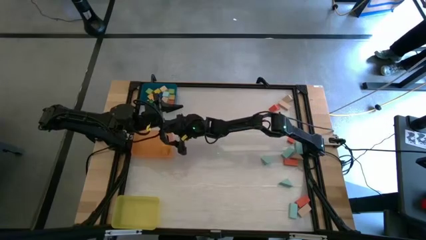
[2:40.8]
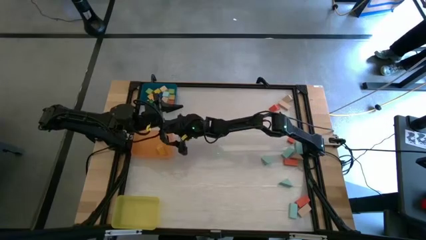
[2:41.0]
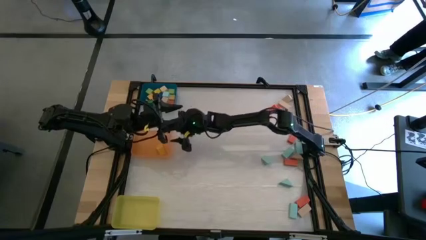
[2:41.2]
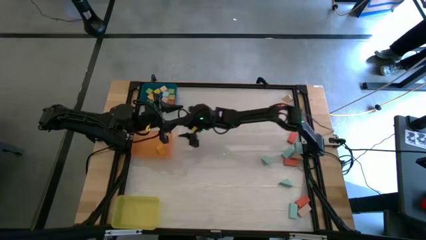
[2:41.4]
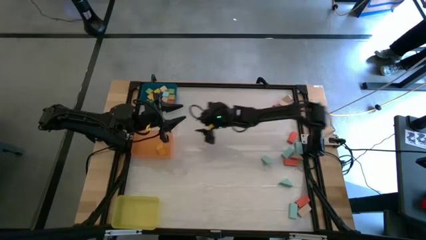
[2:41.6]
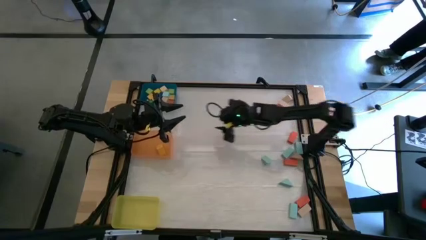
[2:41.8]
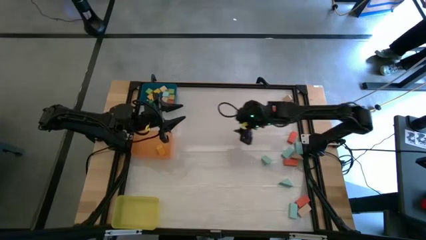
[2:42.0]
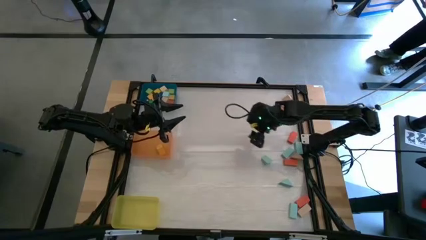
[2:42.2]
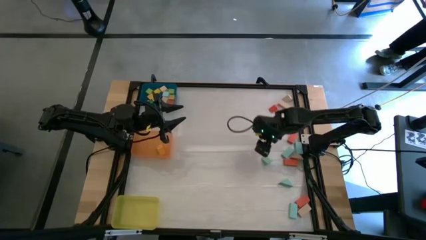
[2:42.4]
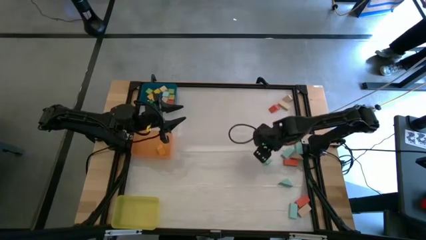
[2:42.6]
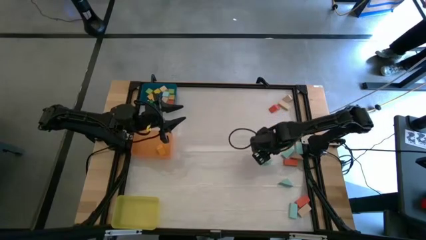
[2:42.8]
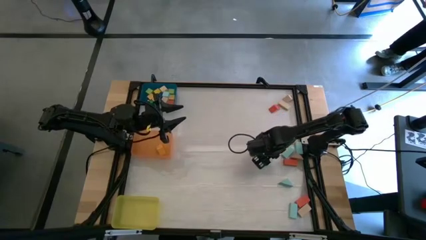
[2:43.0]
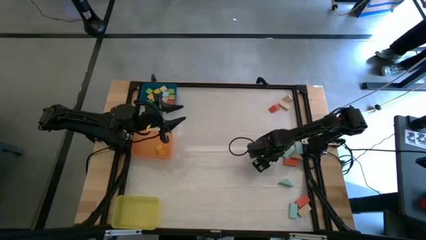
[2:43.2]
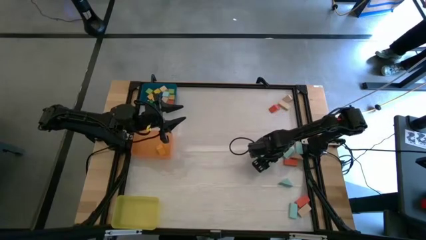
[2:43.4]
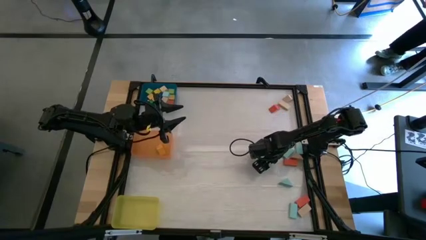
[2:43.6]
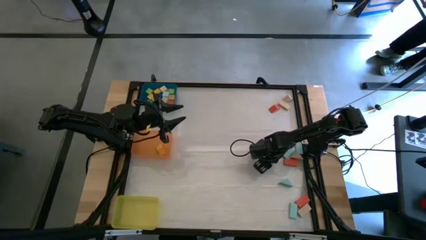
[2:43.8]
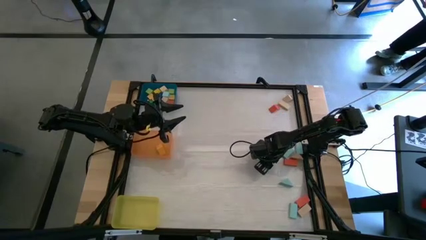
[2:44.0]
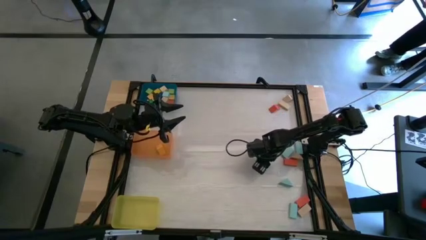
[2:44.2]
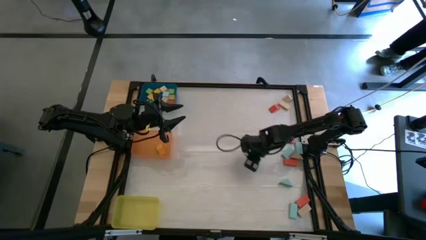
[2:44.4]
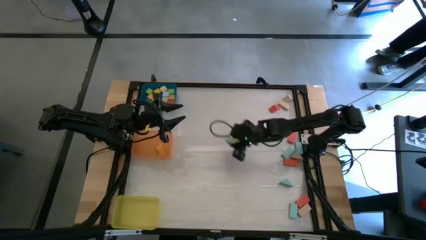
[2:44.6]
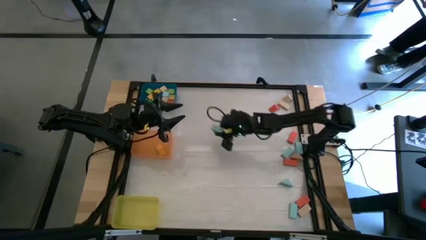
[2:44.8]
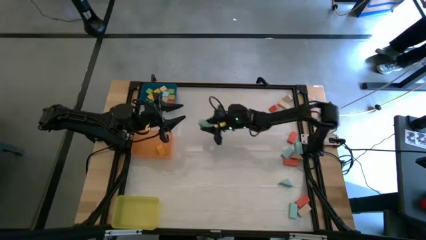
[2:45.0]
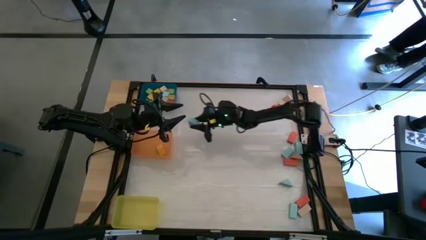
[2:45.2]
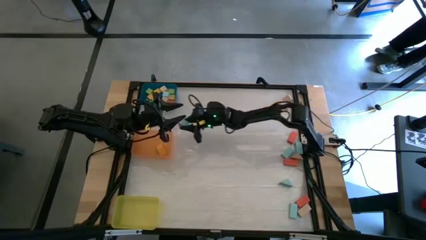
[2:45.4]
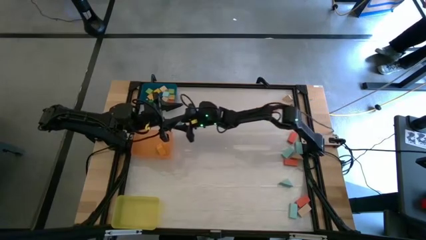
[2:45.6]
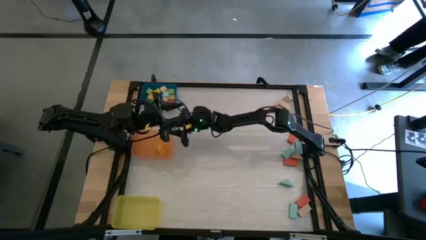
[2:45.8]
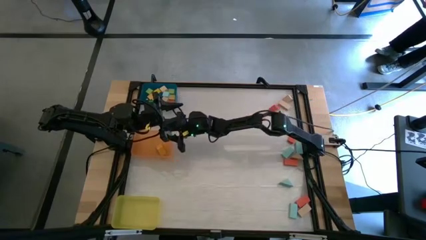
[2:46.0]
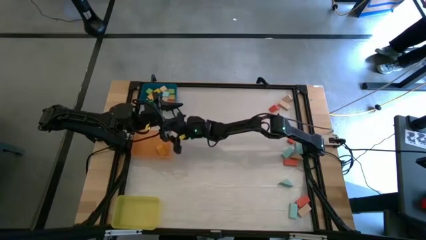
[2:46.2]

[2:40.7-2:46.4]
Task: Sort blocks by size
Put the light blue triangular block into the orange bin

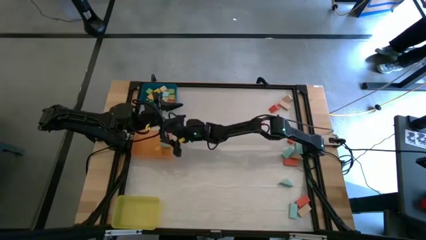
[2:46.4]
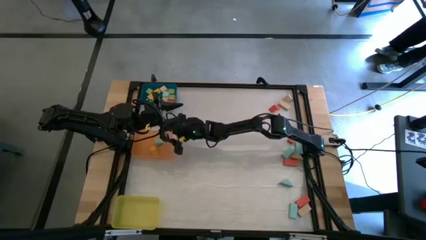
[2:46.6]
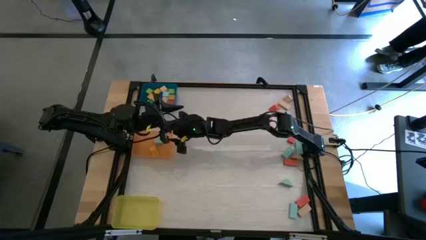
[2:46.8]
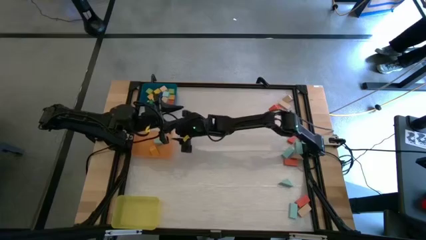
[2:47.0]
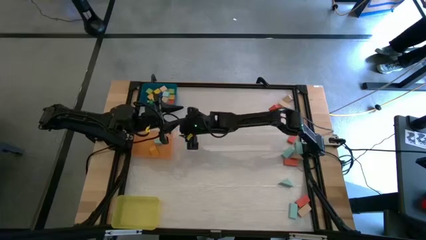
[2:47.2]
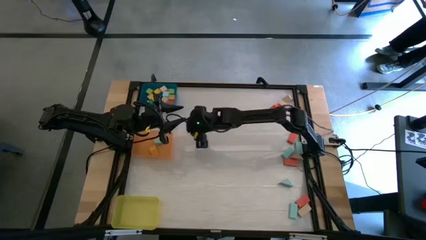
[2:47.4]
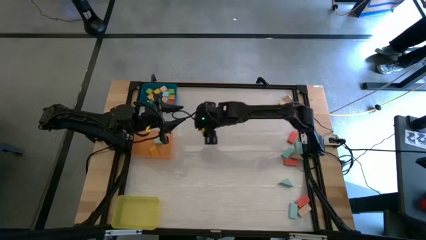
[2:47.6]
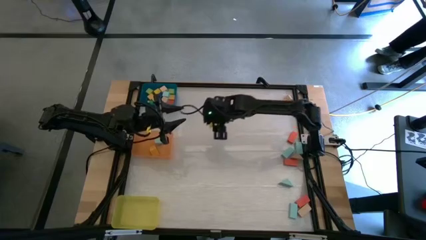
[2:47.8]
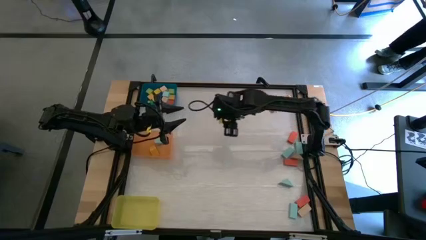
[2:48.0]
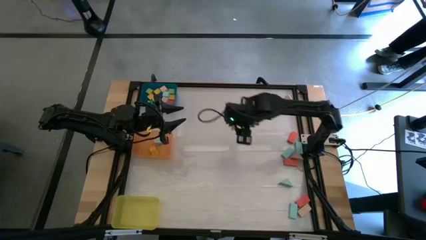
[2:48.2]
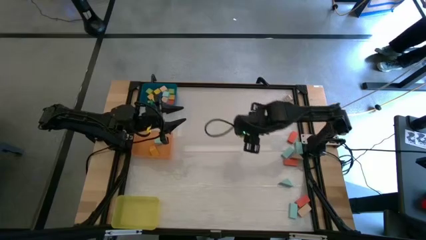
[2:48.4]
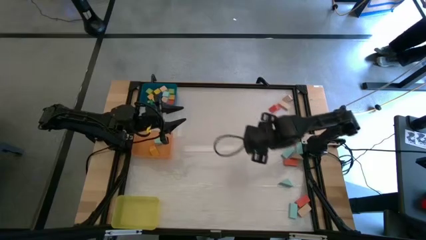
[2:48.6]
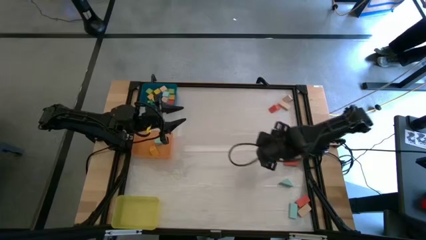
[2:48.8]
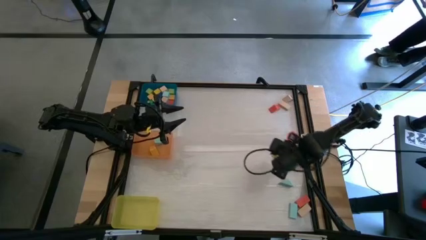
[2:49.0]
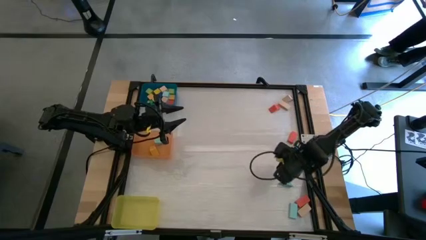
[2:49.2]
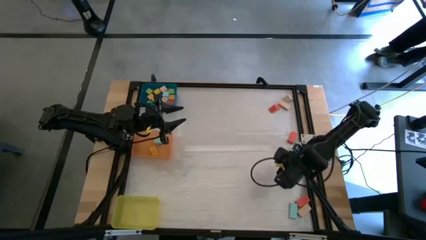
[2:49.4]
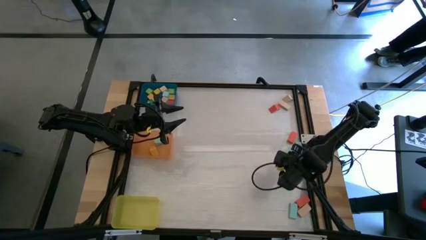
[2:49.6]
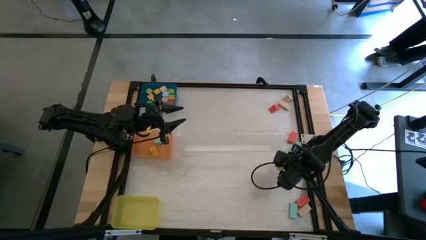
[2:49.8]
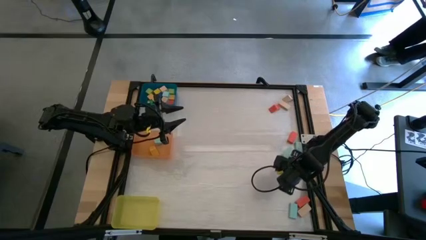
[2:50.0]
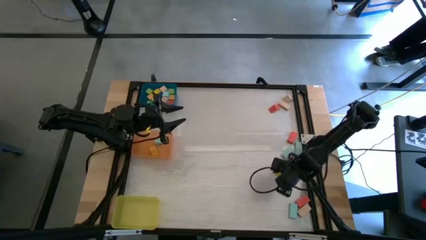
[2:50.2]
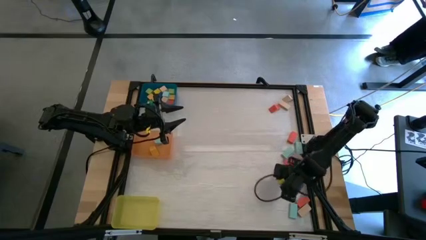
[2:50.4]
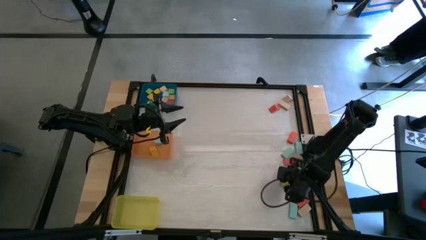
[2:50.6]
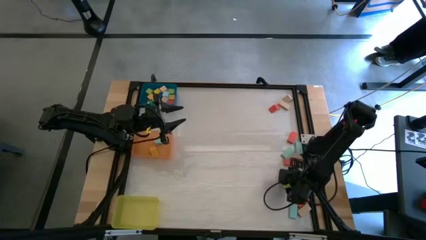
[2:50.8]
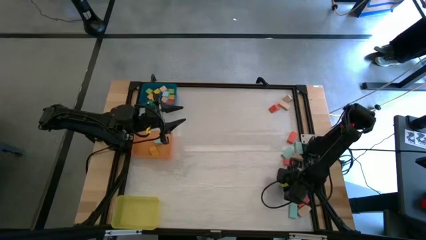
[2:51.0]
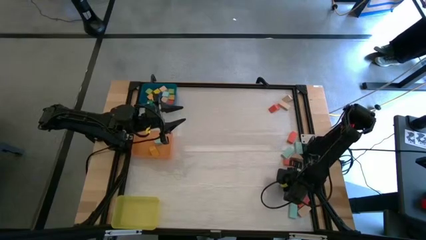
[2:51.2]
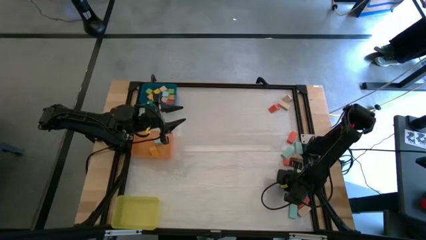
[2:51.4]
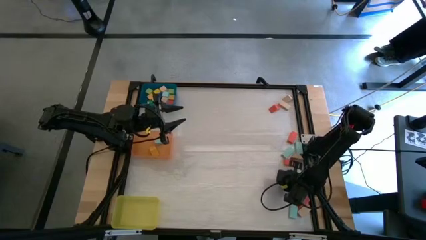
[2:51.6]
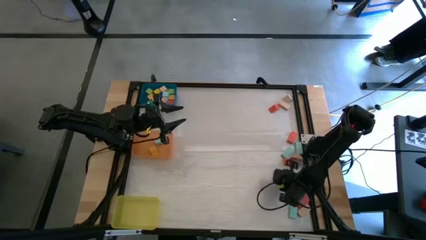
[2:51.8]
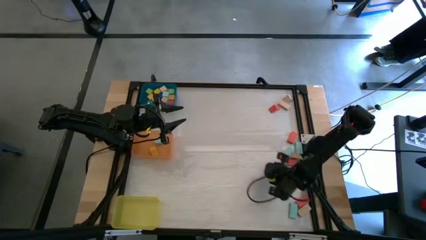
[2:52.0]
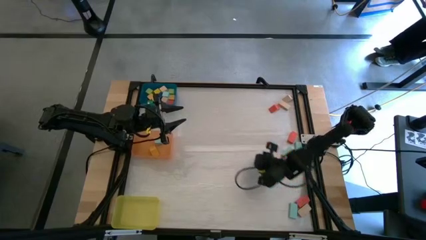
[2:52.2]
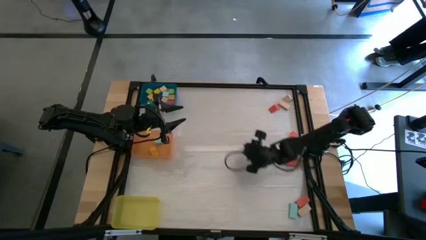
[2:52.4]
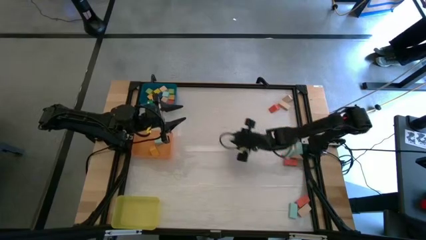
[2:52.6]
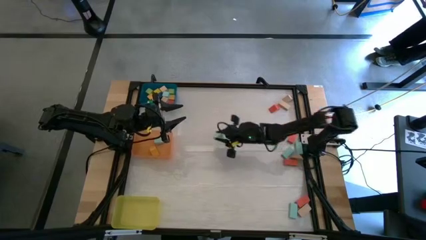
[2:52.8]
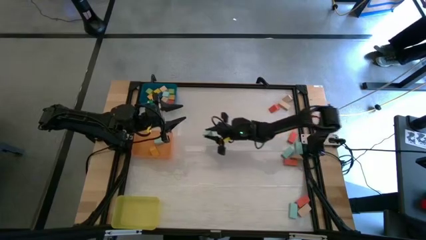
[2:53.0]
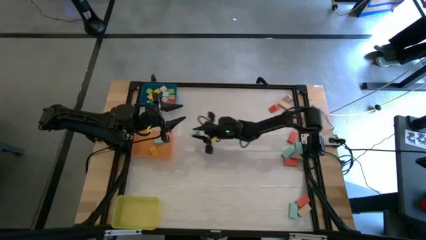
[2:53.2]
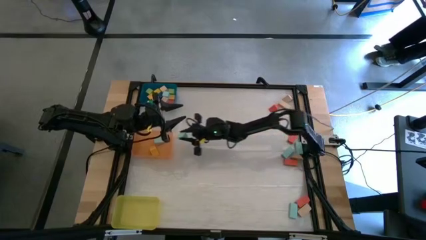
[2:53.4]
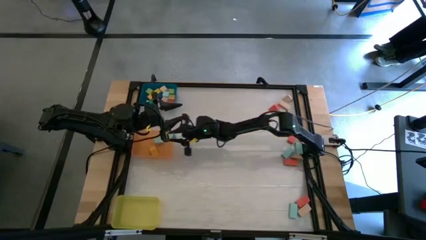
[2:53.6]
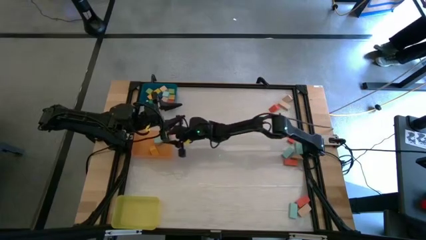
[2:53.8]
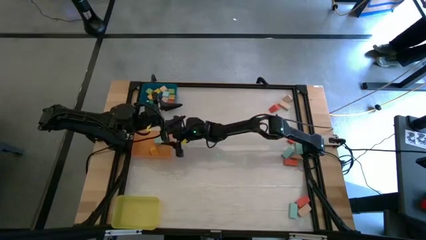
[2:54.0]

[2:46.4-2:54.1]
Put the light blue triangular block into the orange bin

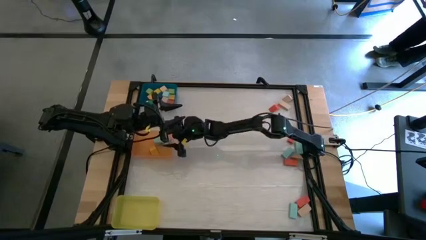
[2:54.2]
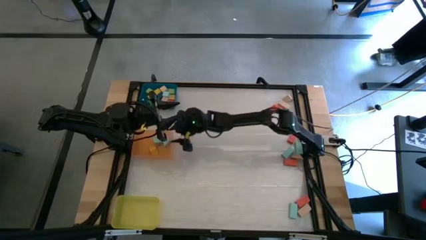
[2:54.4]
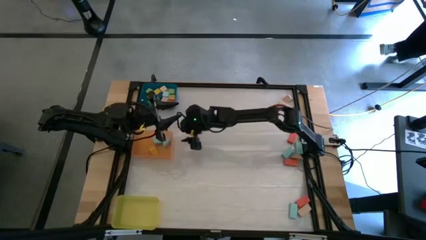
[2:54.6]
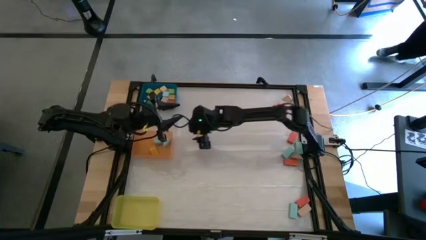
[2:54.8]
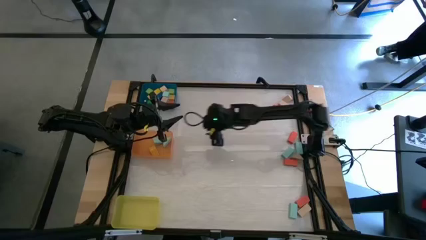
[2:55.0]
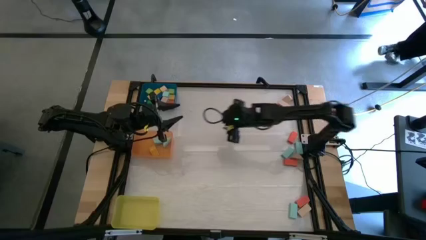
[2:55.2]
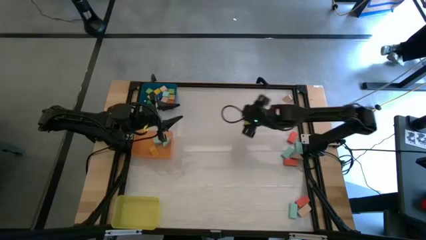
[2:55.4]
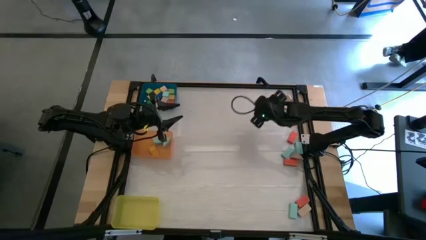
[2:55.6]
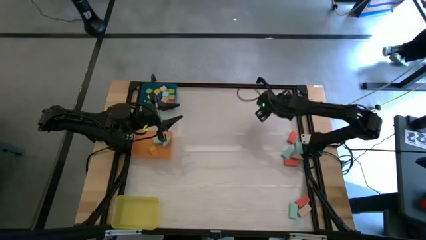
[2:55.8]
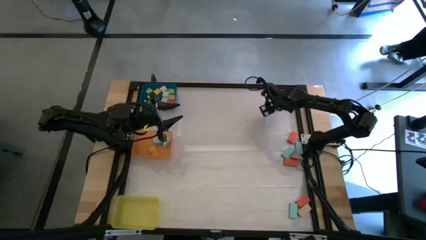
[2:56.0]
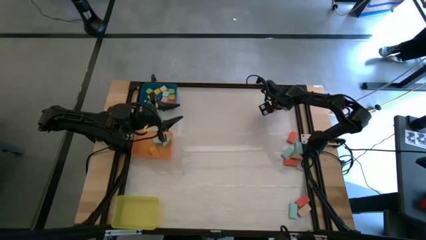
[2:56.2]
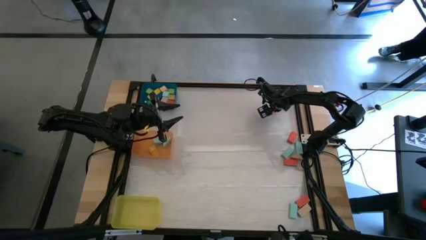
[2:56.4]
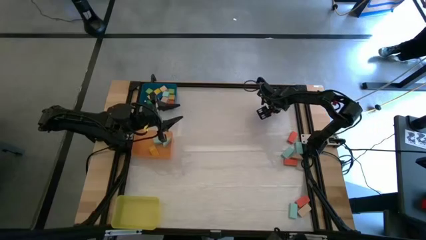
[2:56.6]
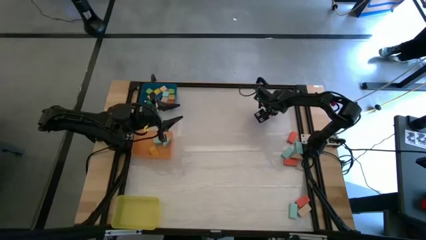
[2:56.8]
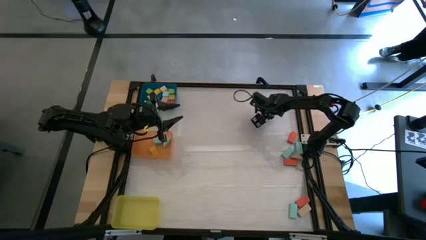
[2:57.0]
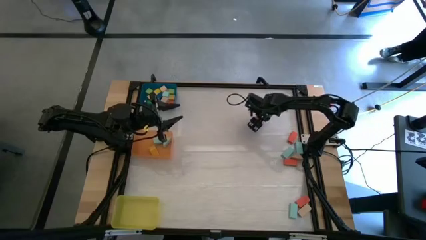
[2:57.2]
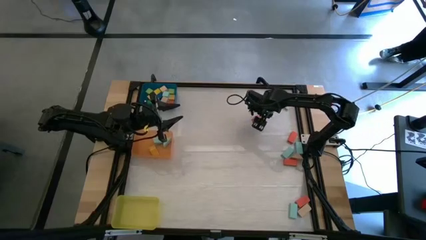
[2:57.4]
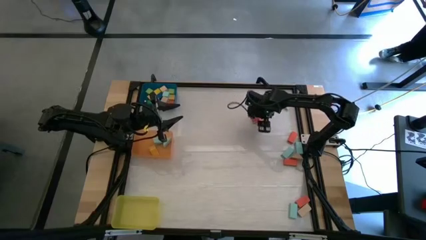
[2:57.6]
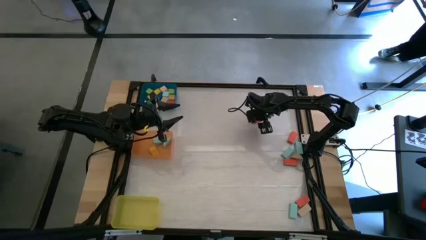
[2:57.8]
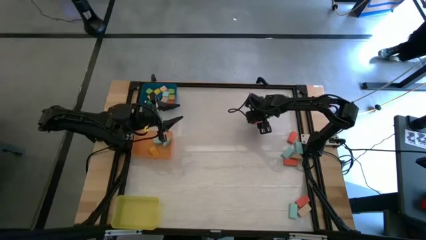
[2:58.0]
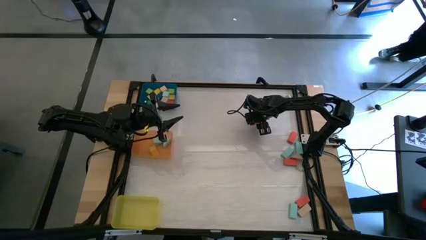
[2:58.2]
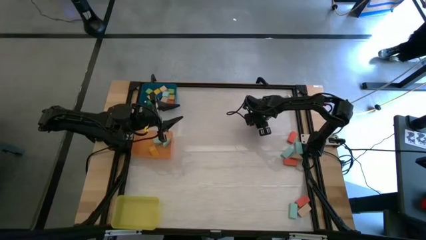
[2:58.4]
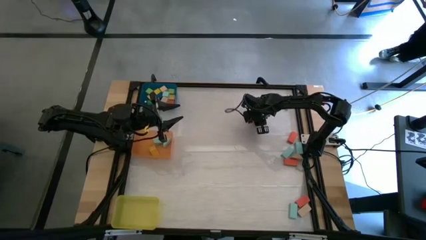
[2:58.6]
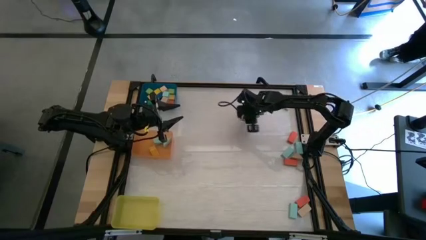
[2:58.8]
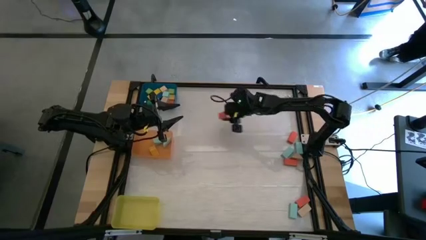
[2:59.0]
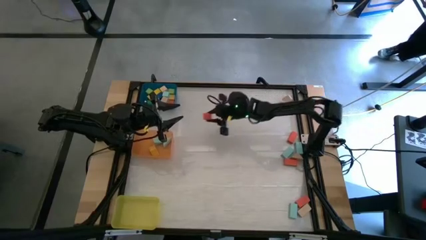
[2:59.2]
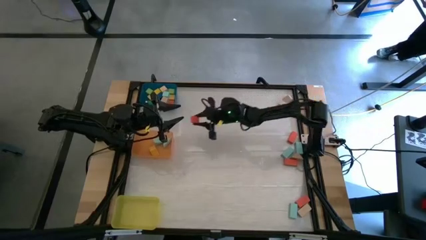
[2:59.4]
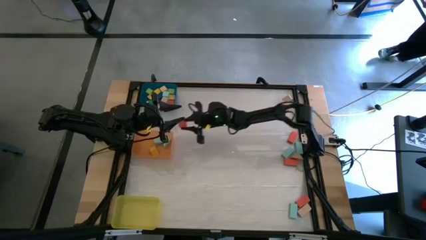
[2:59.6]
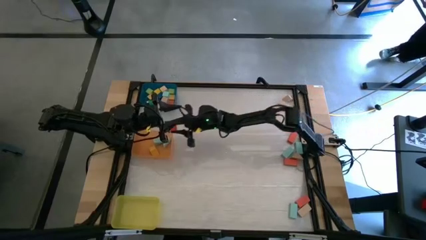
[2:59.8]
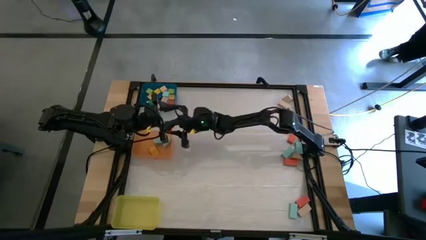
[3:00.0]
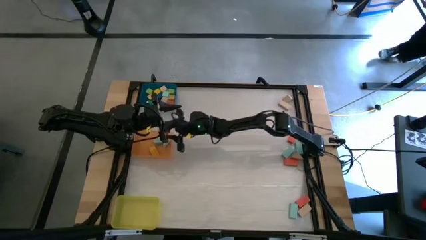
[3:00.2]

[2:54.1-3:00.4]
Put the red triangular block into the orange bin
